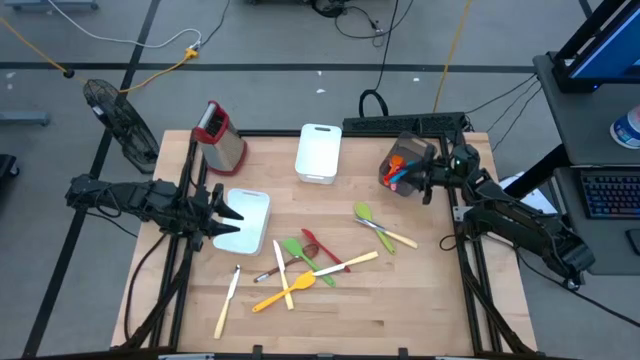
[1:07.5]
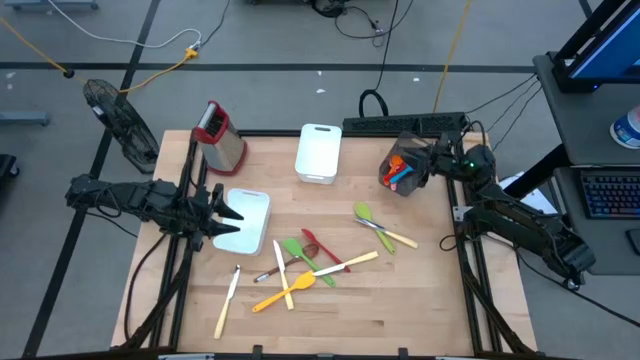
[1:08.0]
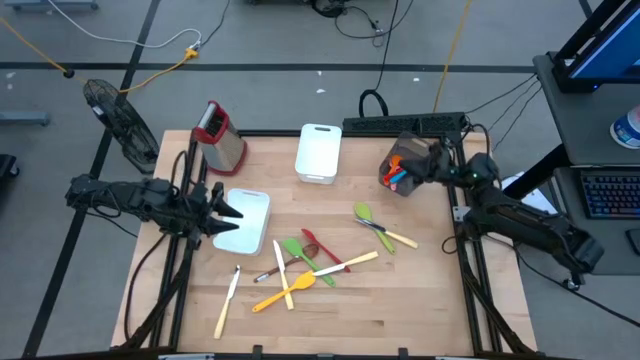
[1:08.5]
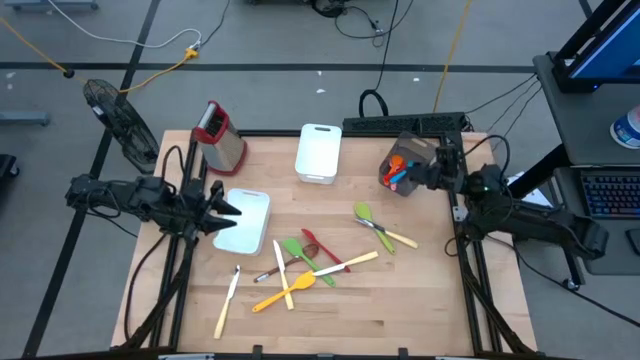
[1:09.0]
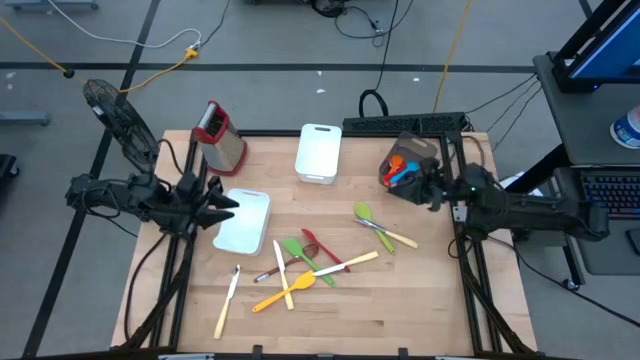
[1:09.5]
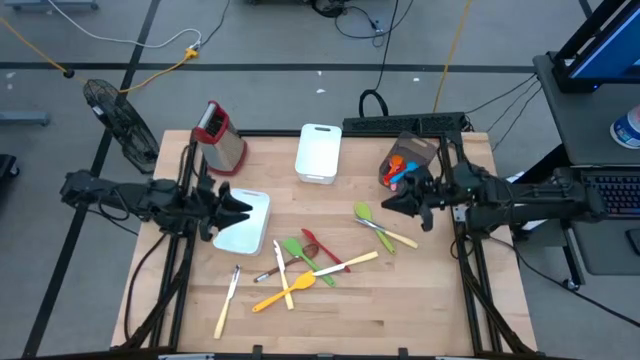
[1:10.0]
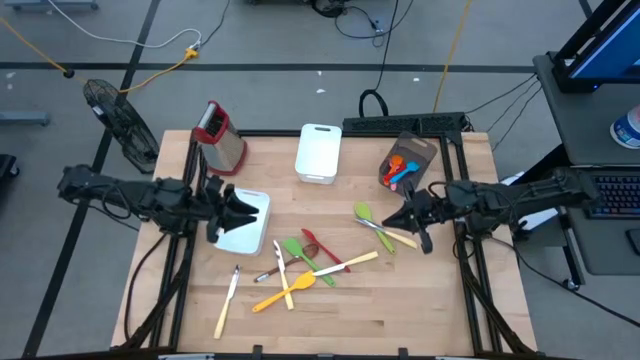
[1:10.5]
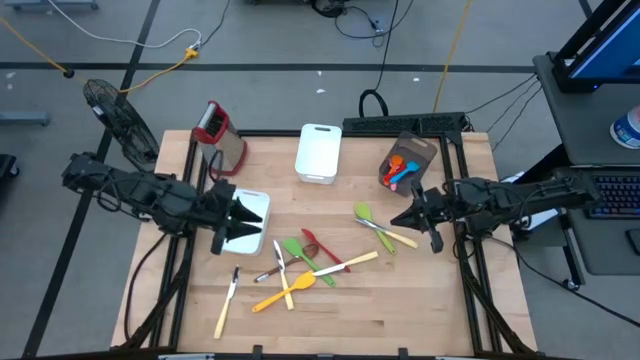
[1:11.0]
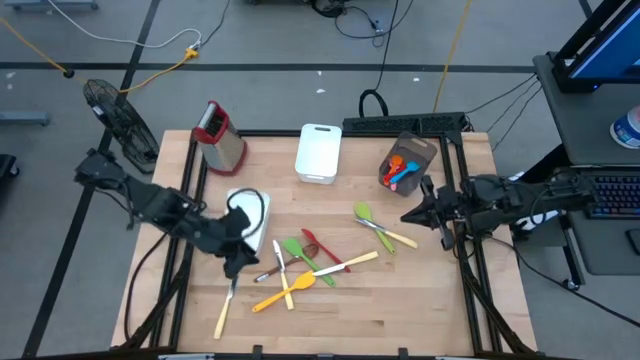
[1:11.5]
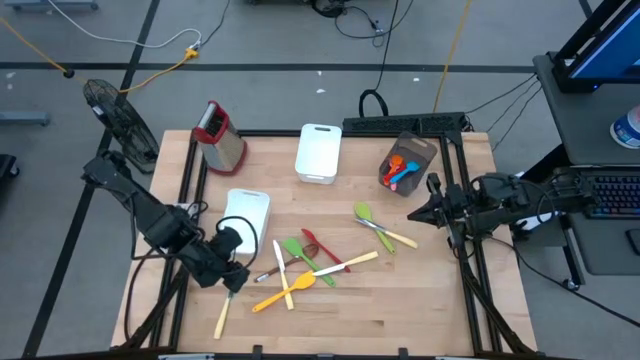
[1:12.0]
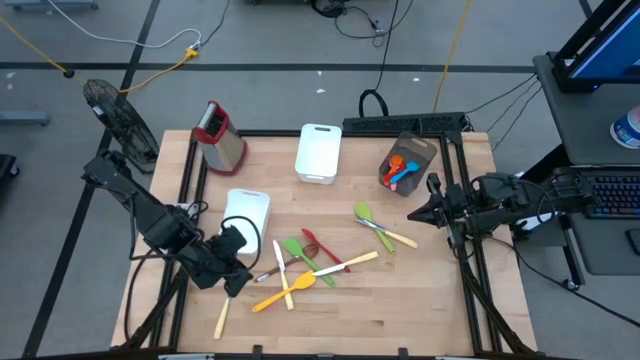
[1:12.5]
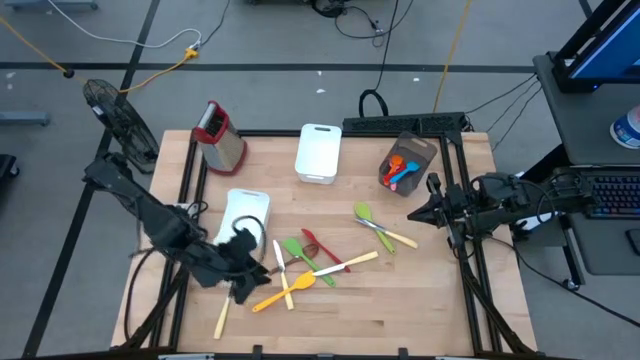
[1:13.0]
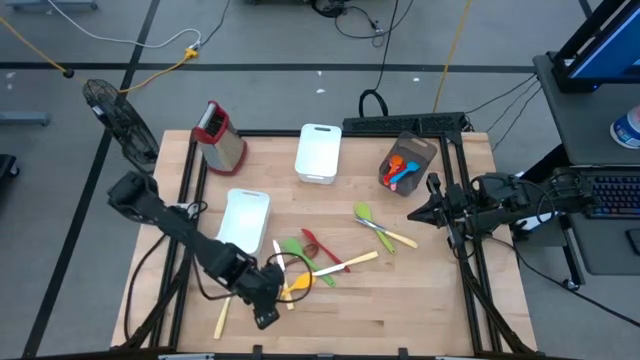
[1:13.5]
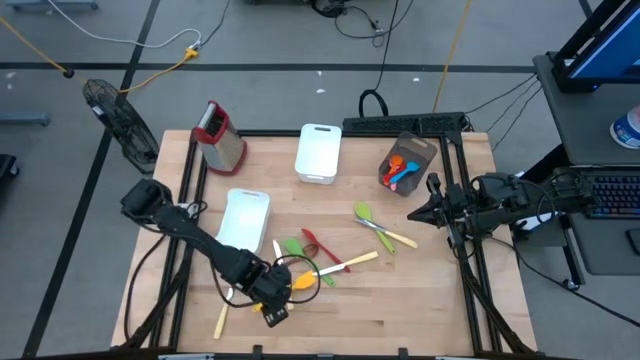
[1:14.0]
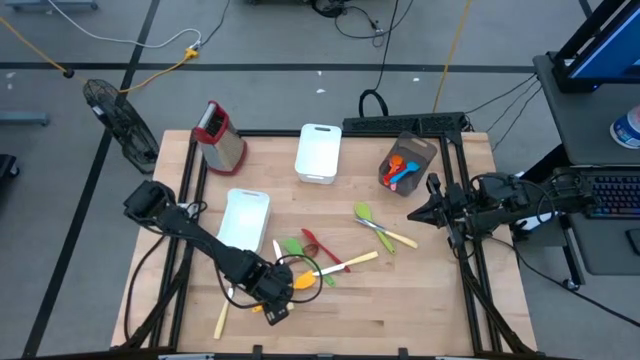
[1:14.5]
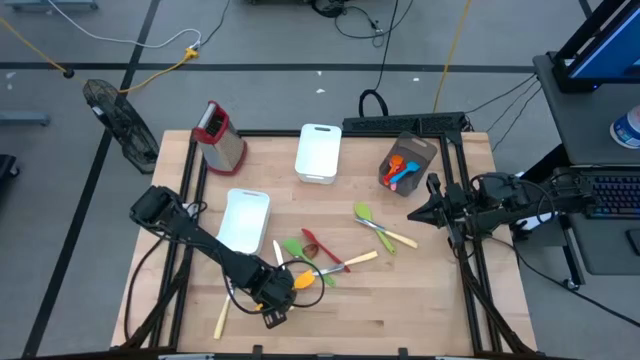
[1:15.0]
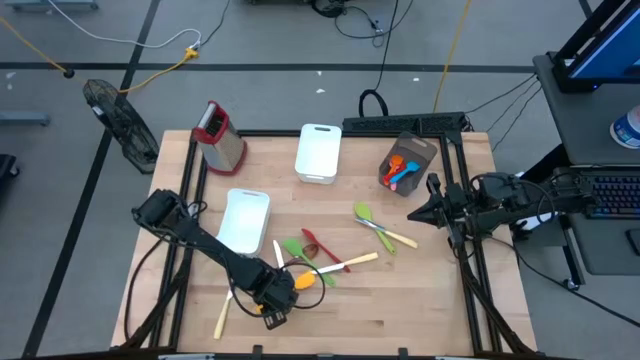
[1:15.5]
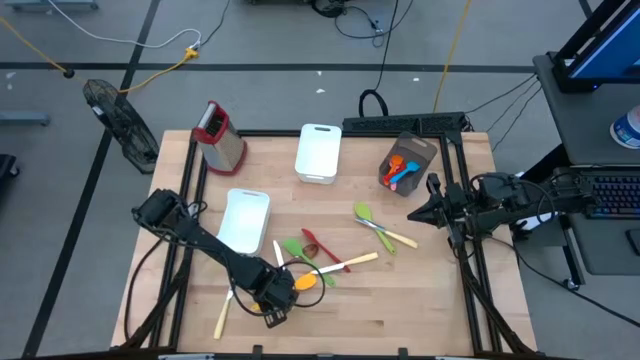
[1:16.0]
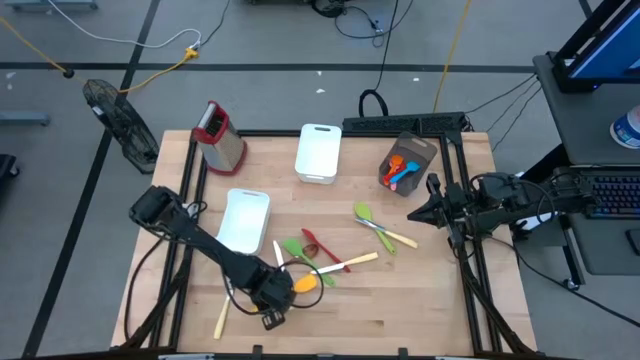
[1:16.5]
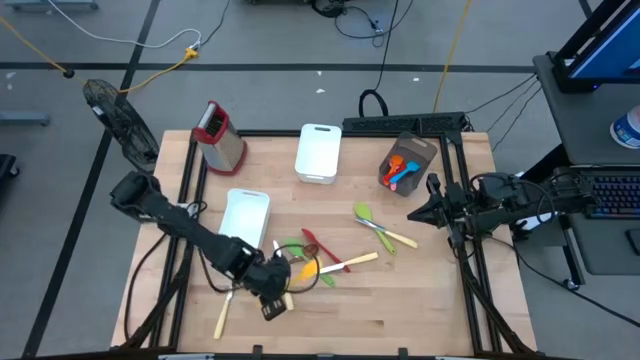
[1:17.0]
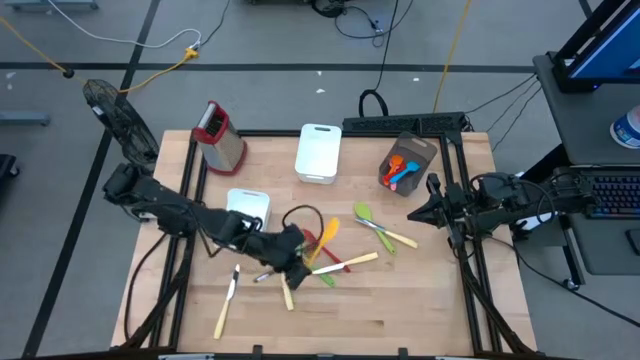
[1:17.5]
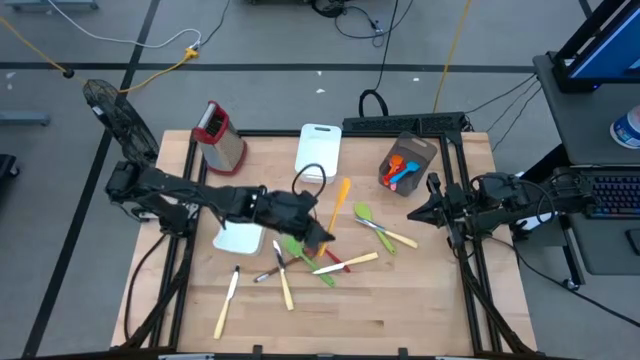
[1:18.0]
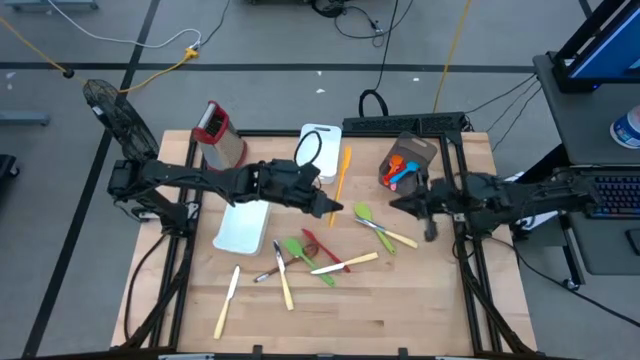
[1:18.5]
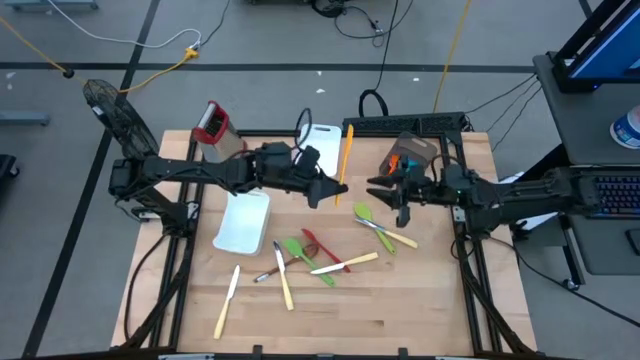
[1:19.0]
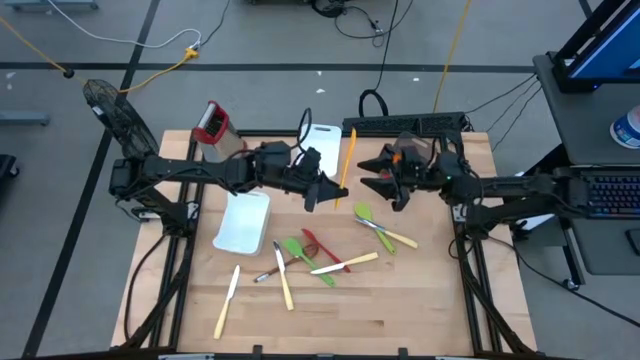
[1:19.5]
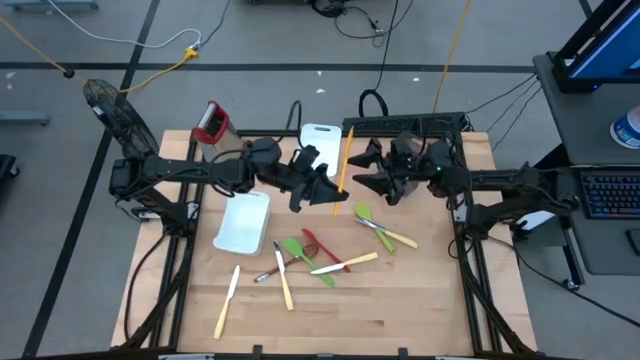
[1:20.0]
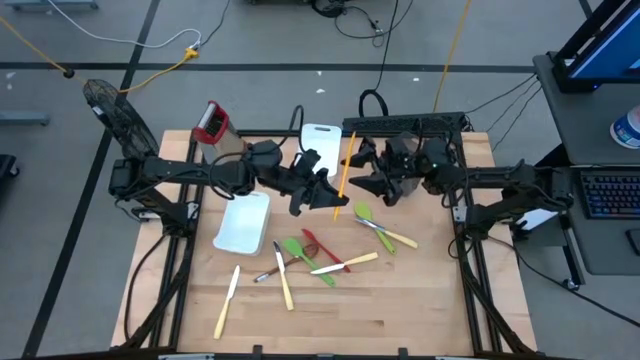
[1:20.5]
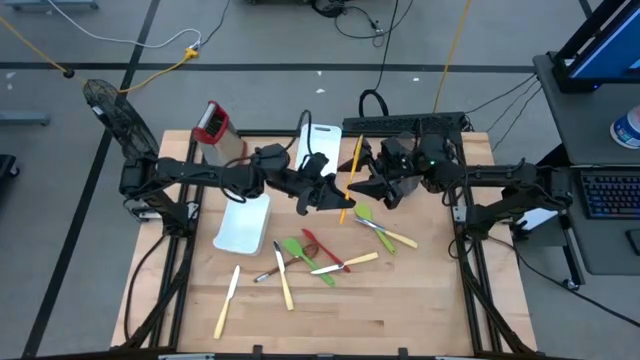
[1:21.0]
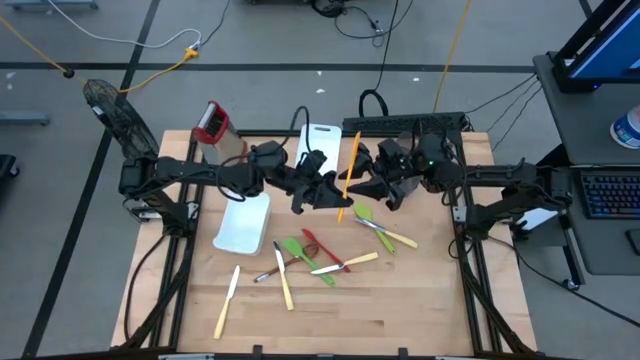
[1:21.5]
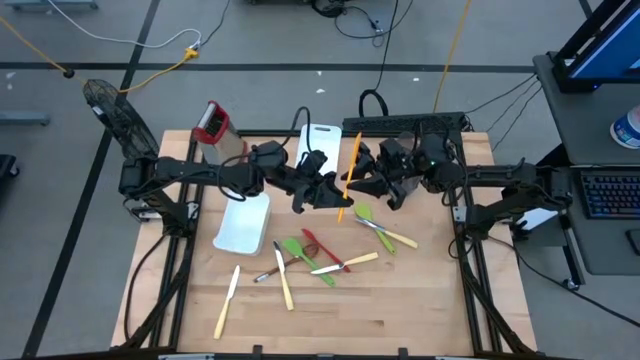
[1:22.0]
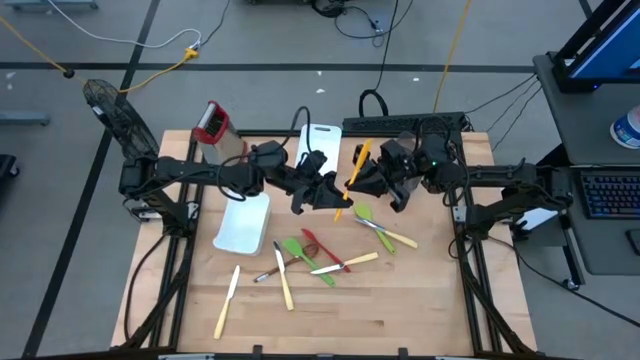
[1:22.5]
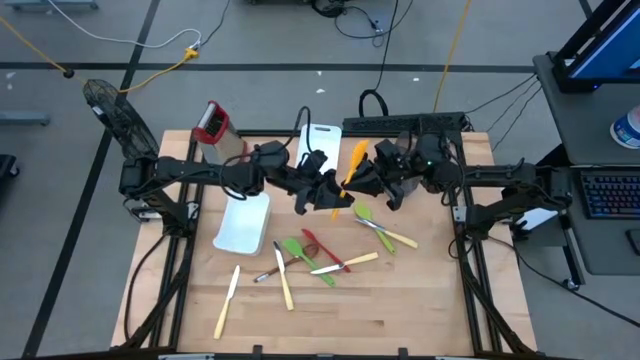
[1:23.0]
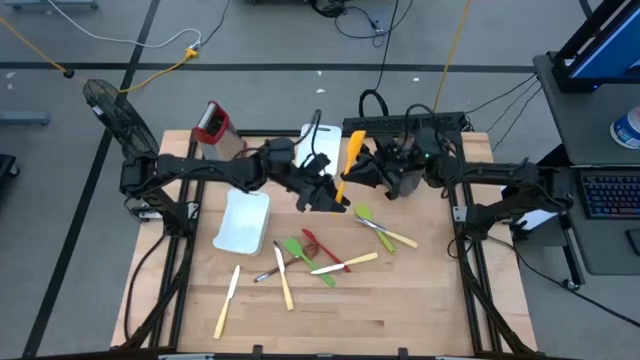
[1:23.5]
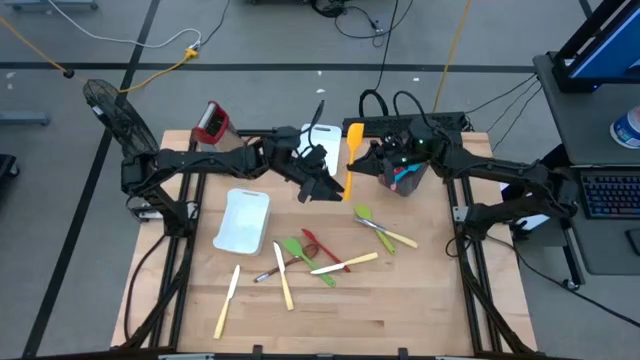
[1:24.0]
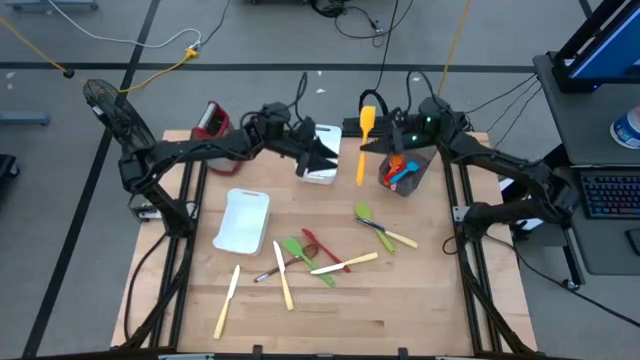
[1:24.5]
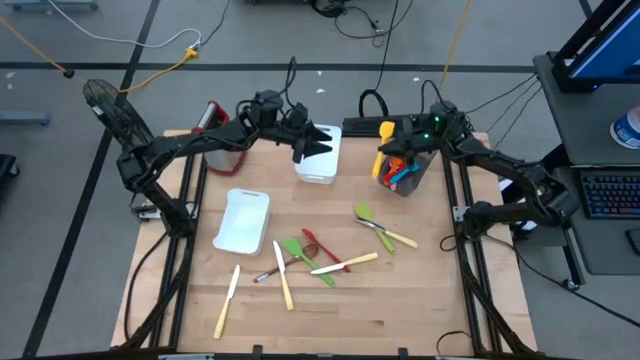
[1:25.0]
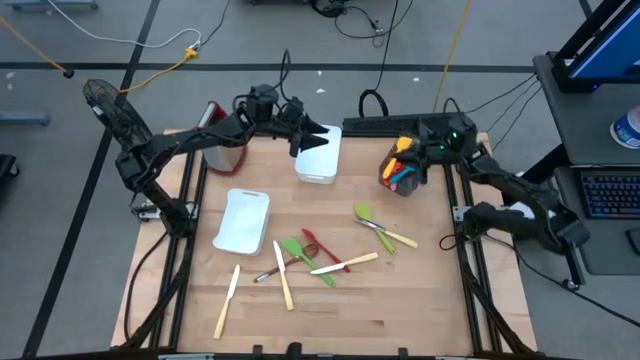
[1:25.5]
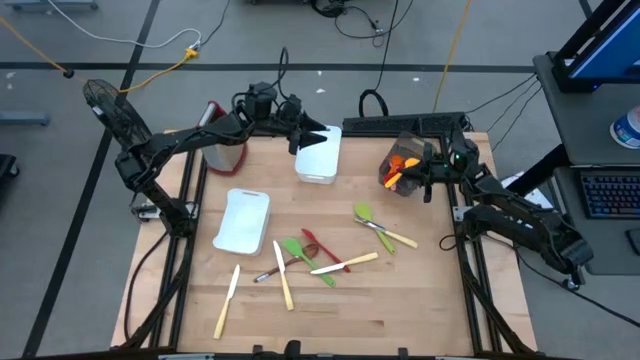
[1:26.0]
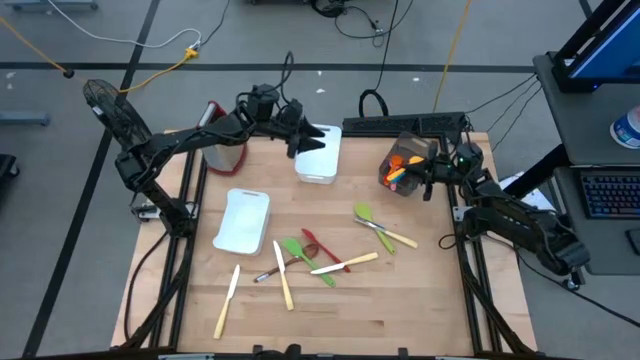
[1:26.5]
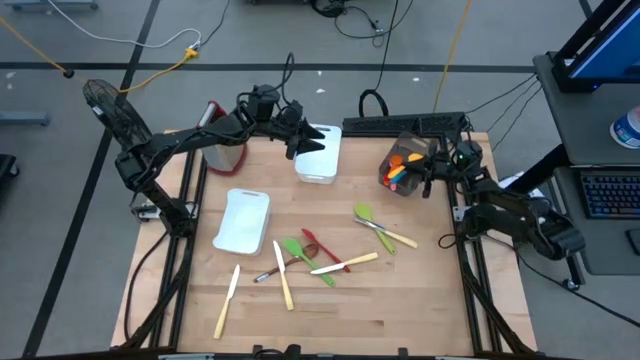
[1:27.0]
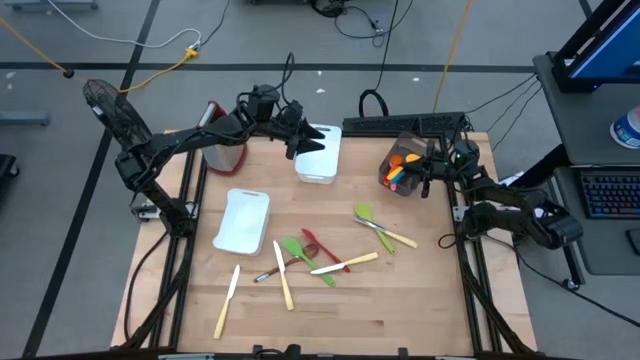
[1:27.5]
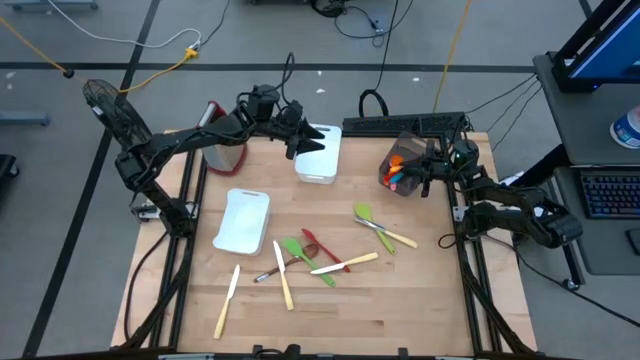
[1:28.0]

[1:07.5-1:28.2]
Task: Pick & Place Kitchen Items
Put the yellow spatula into the black bin
